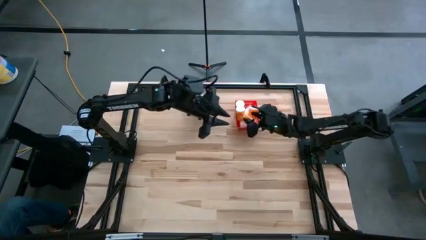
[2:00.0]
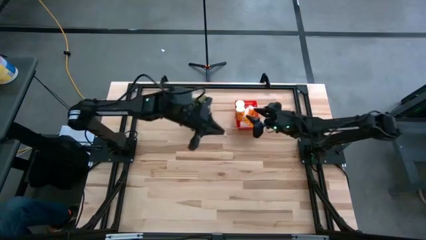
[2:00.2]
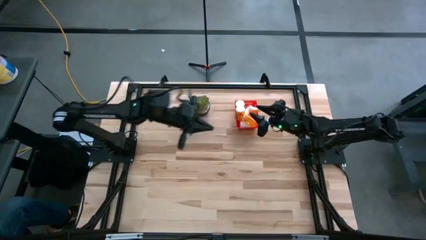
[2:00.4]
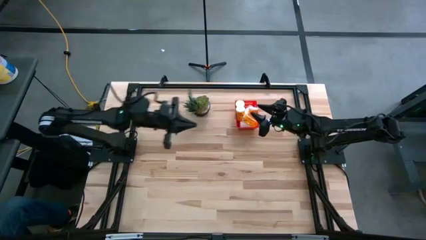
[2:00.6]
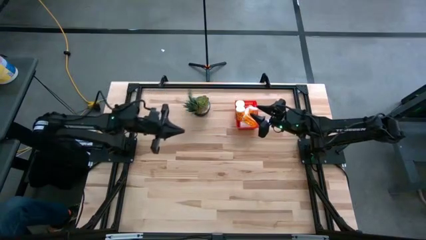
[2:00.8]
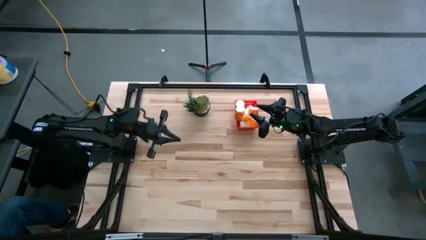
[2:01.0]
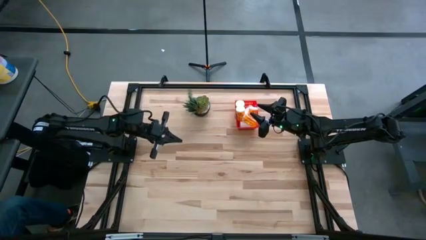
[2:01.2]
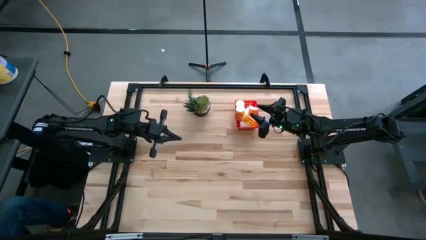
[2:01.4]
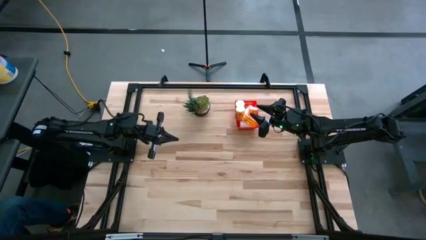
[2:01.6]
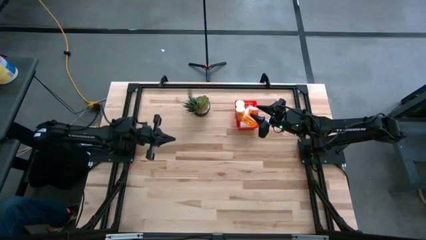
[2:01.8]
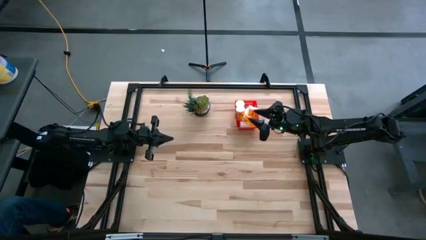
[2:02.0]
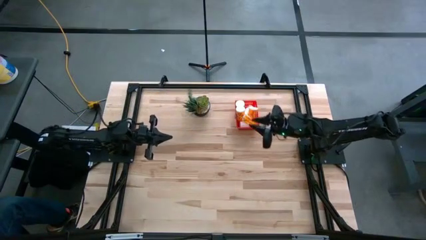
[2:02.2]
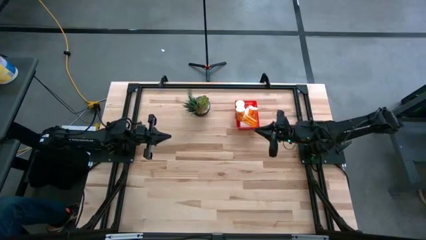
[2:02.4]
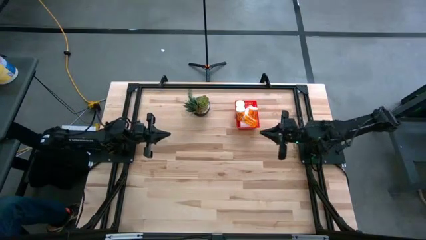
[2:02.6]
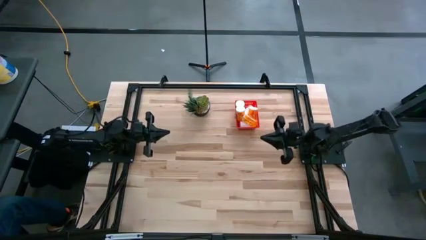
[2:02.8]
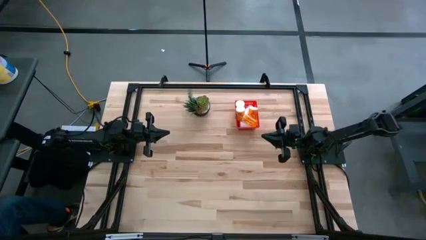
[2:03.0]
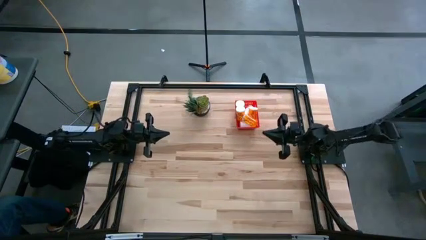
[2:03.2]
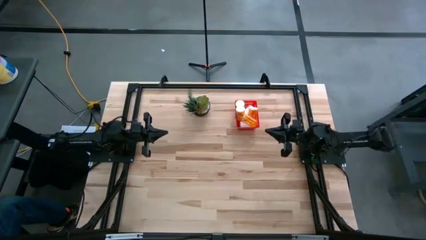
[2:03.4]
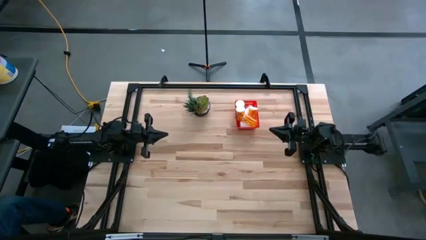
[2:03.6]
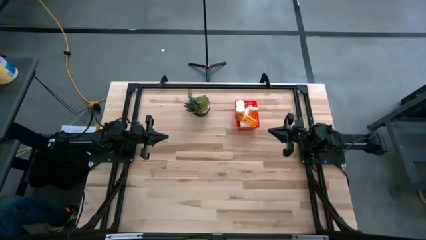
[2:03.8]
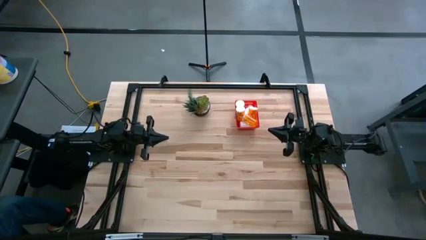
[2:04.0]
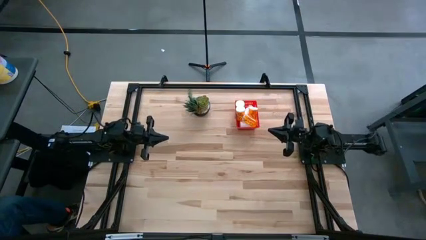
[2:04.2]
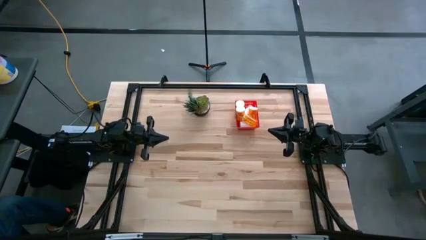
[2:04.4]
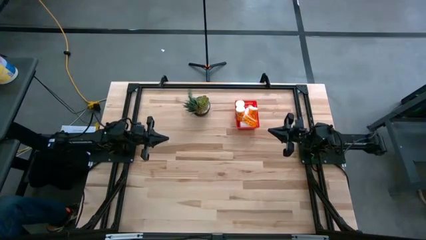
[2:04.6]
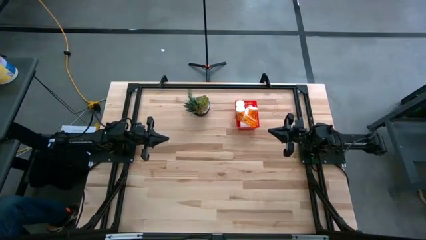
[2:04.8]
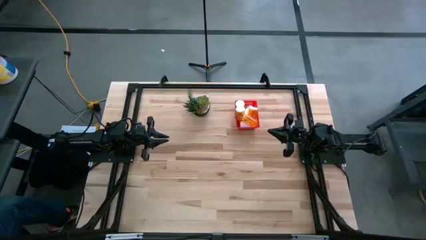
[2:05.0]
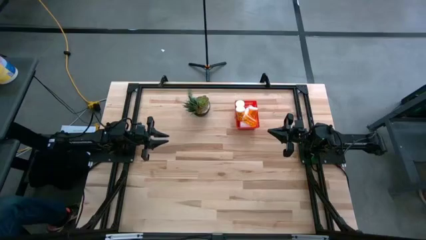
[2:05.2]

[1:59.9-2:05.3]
Task: Pick and place pill bottles into a basket
Return to Home Position

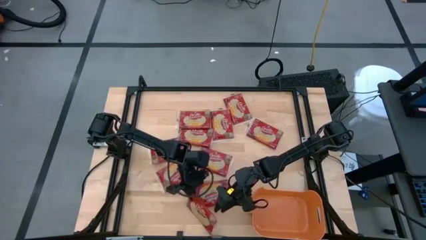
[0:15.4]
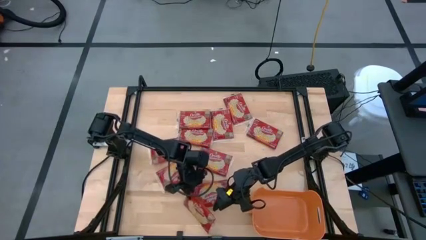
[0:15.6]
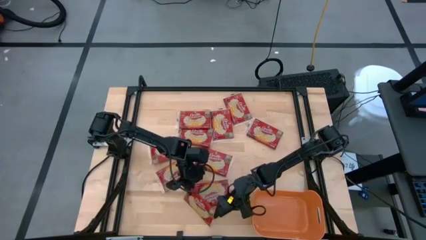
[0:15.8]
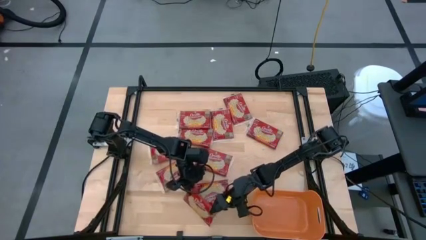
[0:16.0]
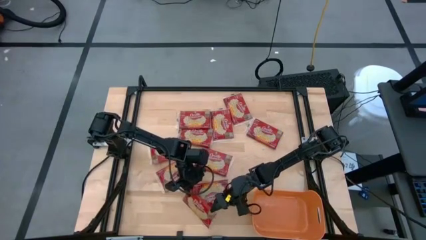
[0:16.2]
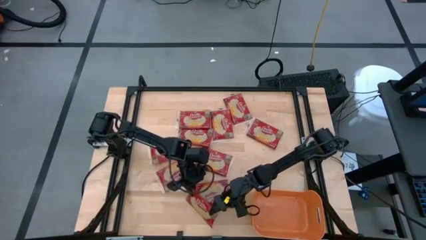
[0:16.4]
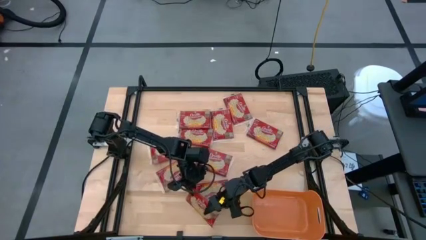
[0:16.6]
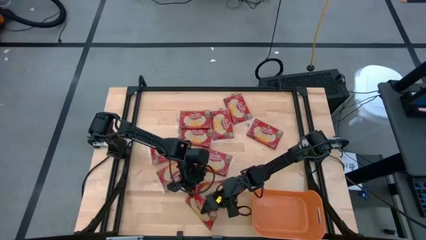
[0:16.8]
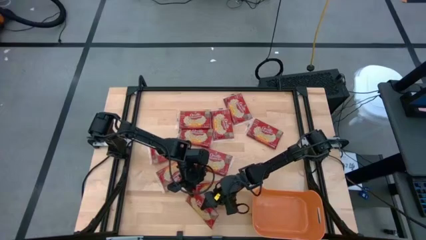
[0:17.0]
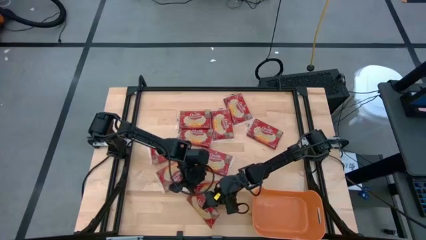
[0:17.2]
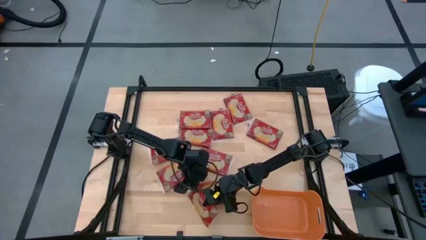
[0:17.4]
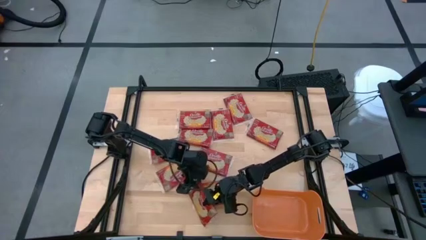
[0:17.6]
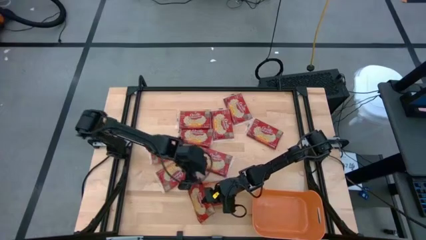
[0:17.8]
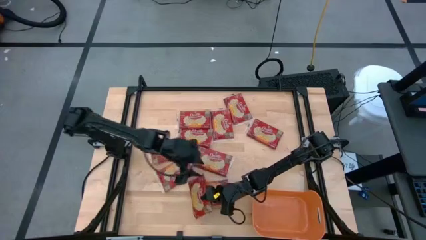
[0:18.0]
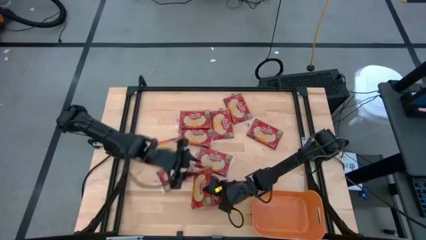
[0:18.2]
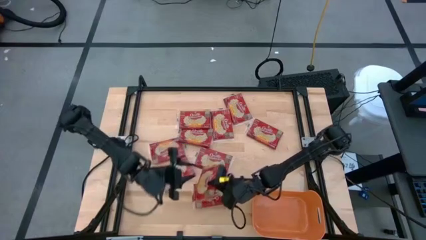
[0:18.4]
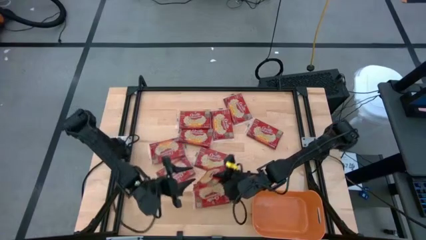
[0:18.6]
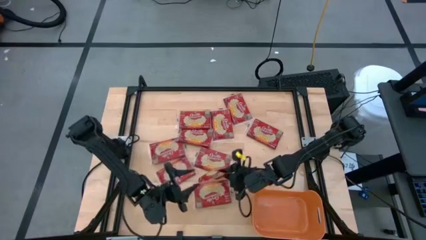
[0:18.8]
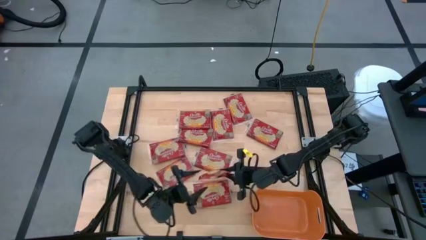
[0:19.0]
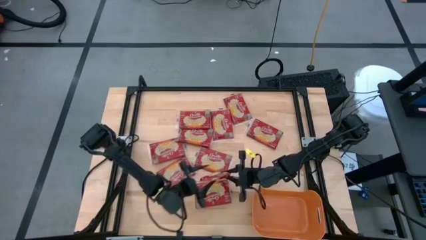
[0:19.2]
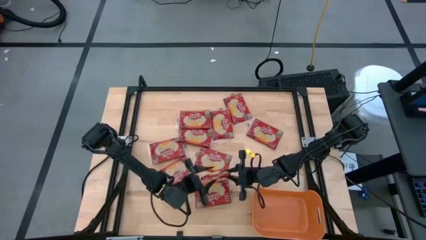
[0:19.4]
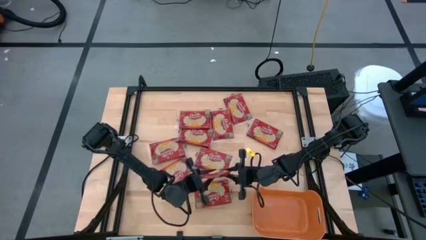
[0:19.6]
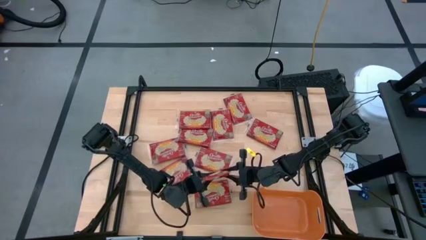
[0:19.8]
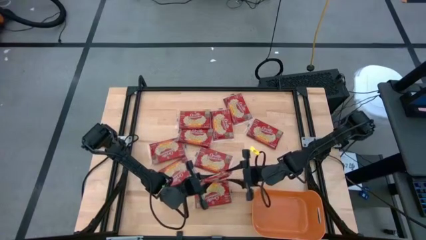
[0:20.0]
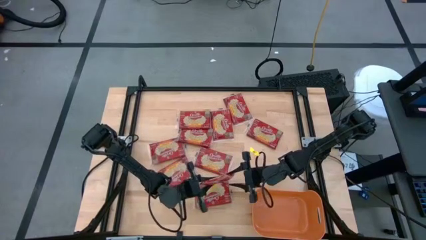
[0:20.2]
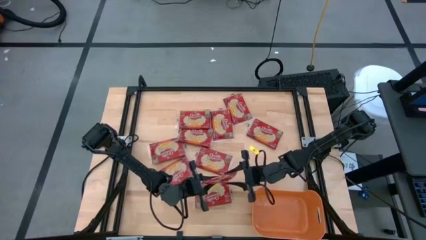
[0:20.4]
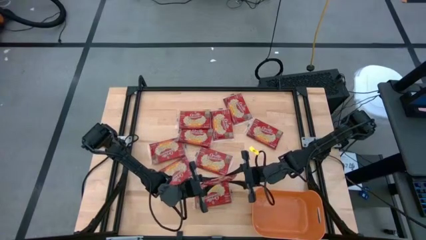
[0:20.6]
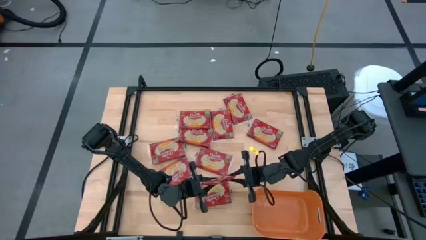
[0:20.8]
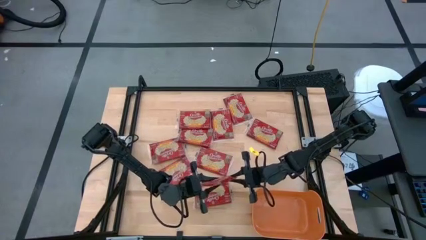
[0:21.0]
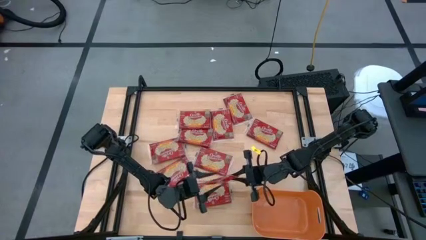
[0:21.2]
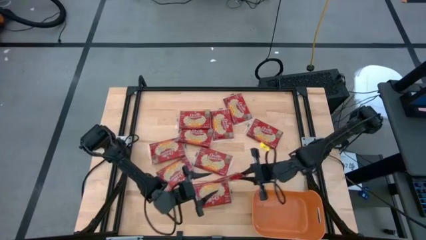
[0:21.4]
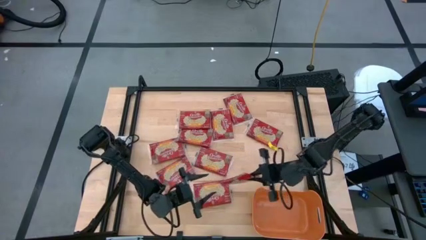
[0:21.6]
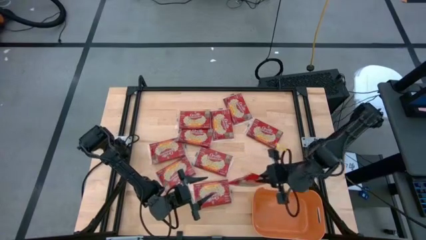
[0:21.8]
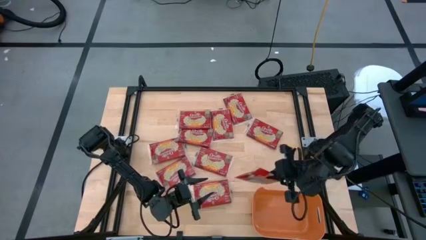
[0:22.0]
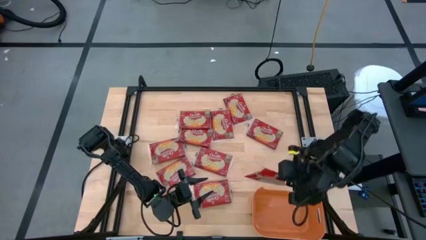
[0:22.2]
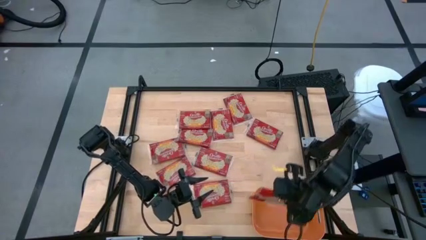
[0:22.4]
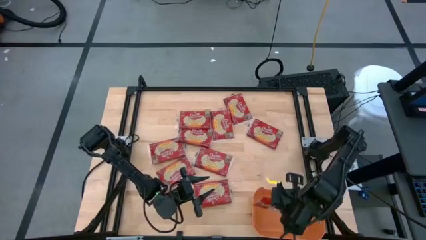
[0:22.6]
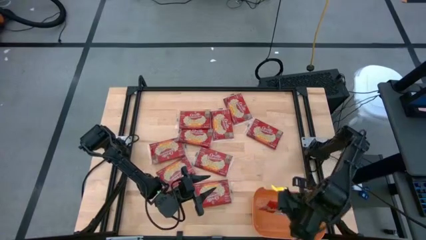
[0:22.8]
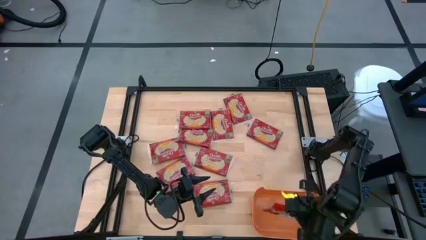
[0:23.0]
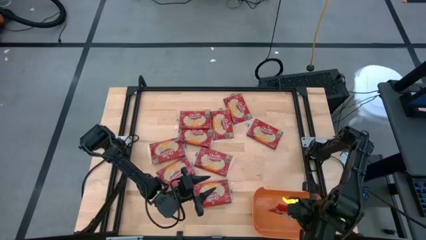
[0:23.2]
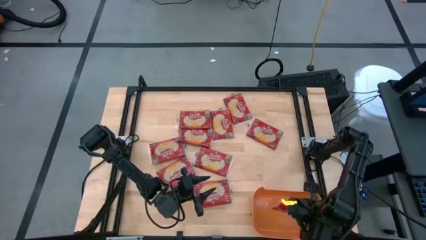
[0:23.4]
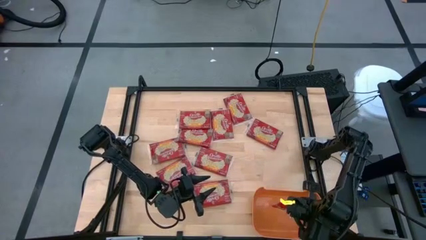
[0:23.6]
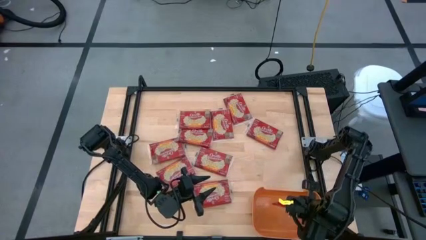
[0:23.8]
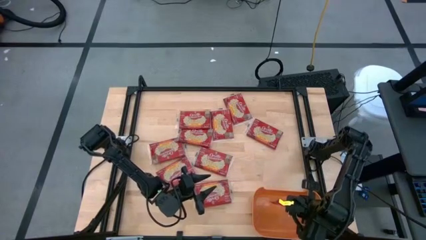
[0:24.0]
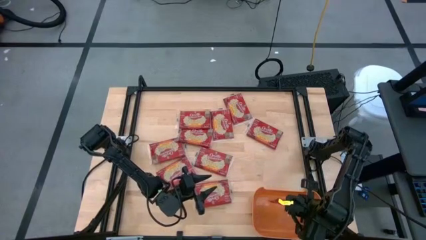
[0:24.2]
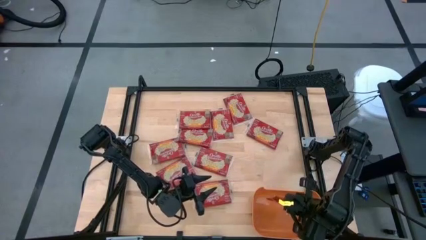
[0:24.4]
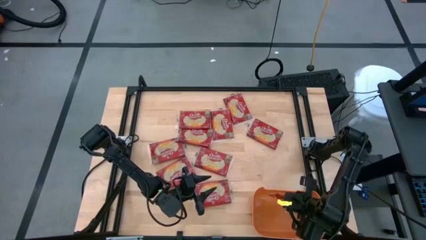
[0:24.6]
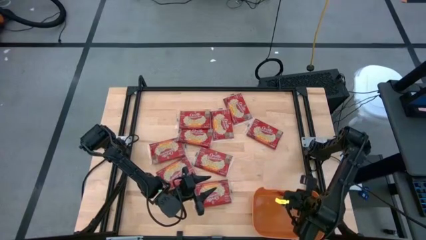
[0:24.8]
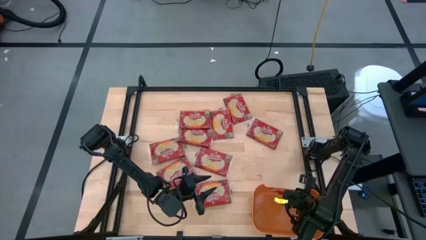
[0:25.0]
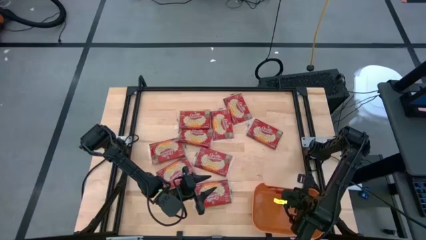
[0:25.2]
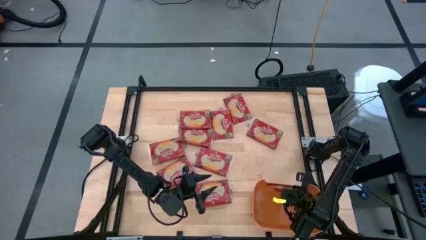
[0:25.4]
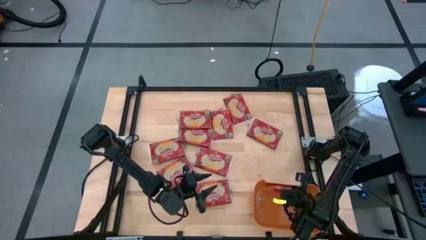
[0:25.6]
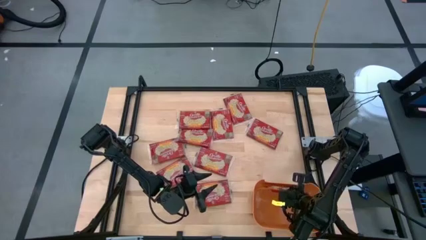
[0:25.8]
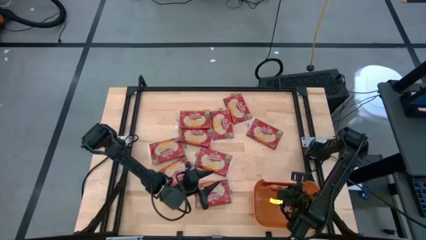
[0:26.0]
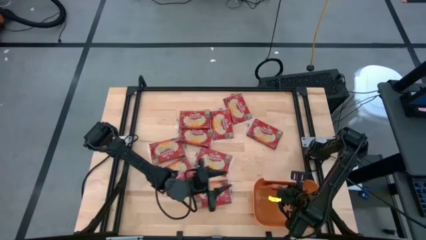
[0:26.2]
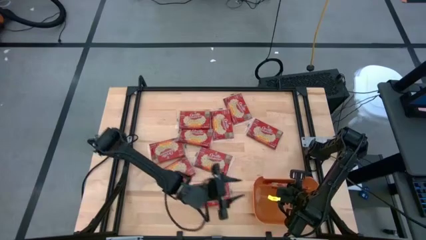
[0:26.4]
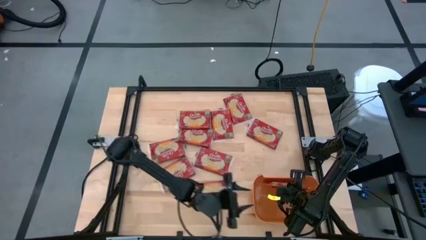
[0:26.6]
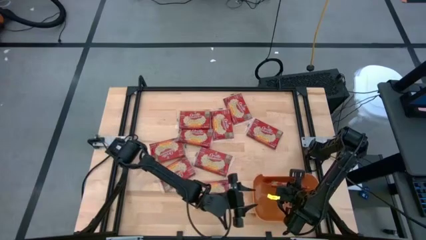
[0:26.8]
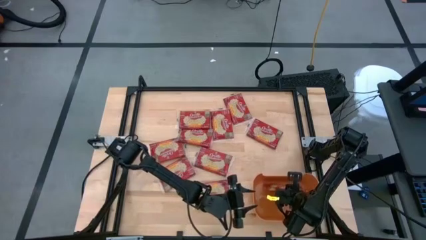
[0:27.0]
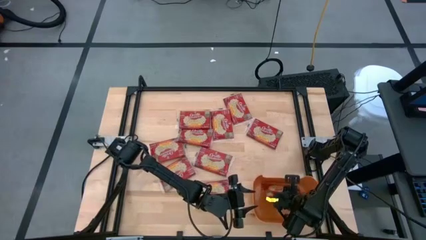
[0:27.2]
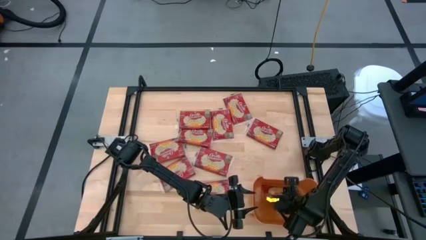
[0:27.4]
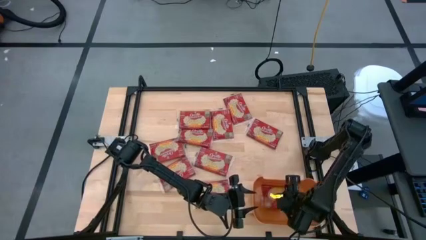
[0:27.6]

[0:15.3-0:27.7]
Task: Sort popcorn bags into baskets
Put the red popcorn bag into the orange bin

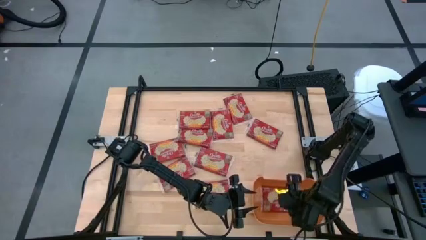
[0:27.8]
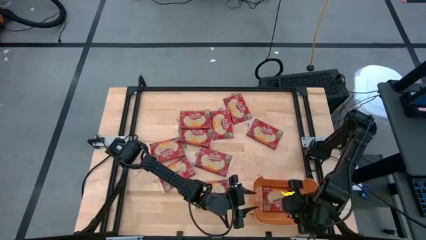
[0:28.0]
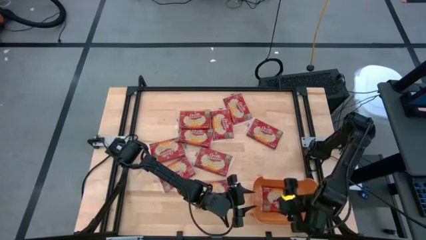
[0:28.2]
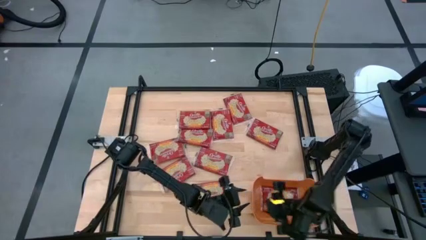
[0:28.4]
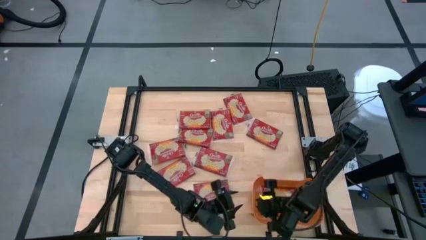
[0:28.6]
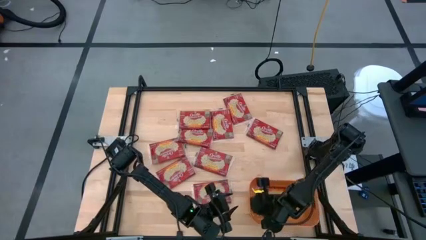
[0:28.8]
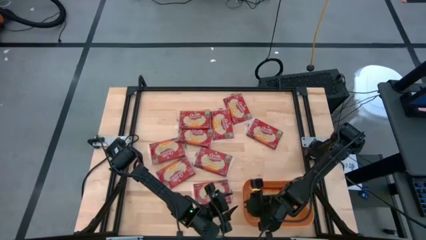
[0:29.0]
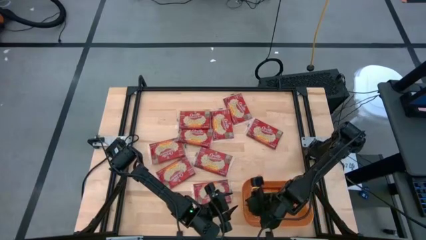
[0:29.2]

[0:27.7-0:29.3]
Adjust the orange bin
